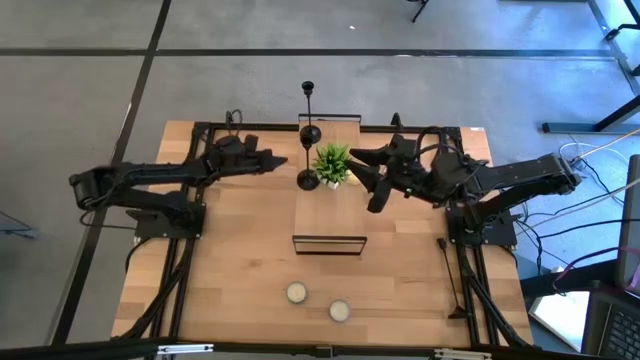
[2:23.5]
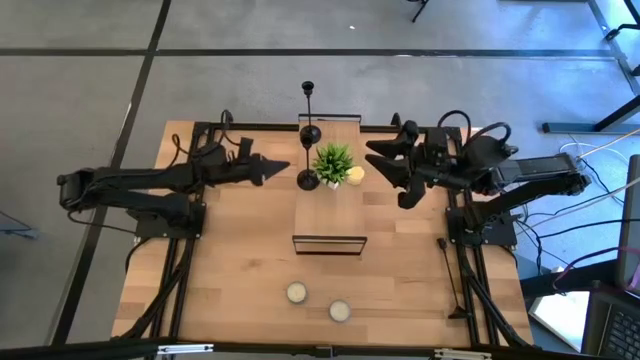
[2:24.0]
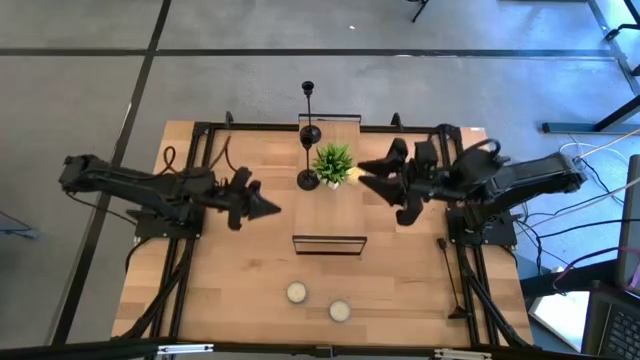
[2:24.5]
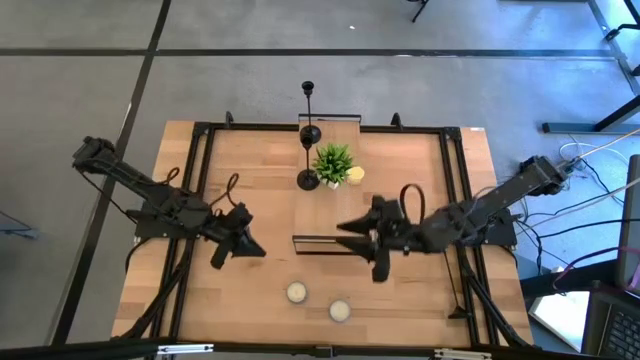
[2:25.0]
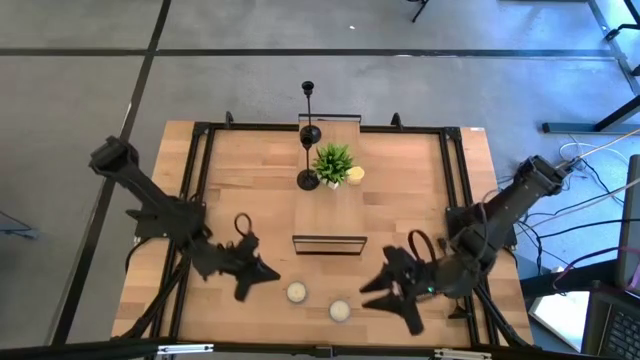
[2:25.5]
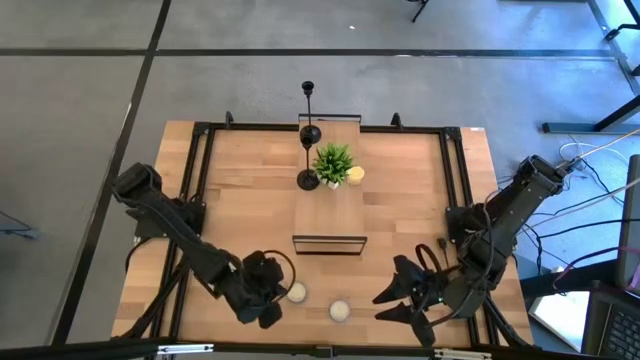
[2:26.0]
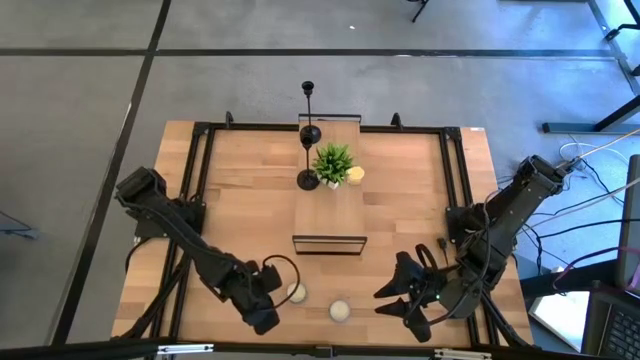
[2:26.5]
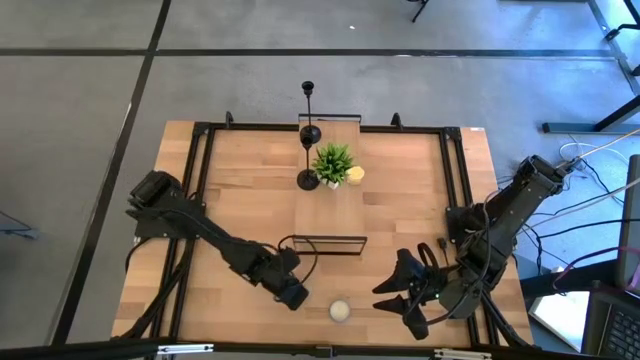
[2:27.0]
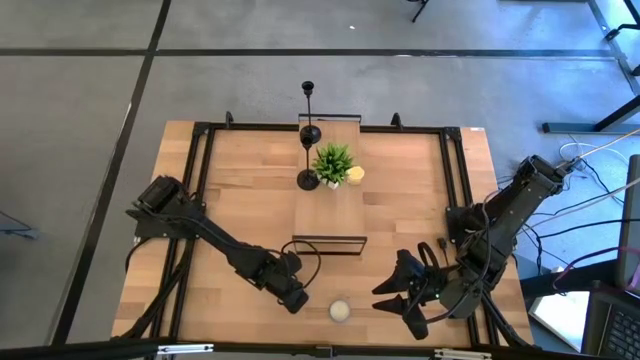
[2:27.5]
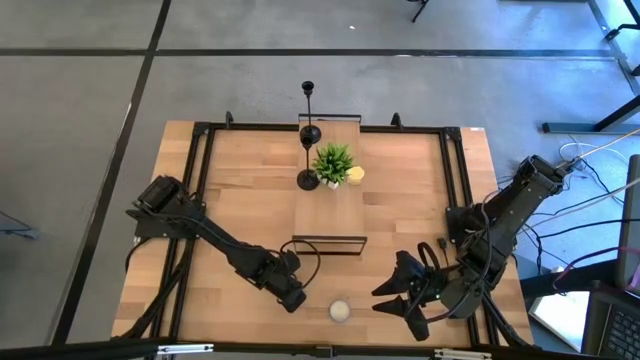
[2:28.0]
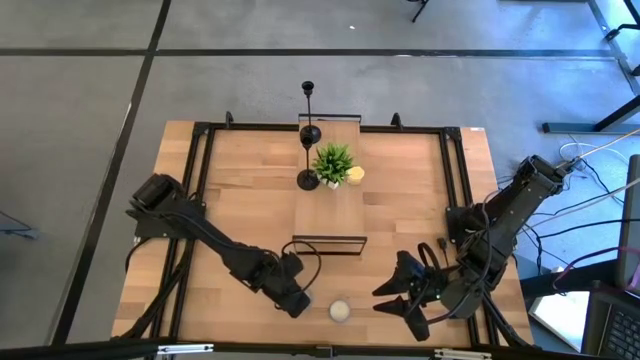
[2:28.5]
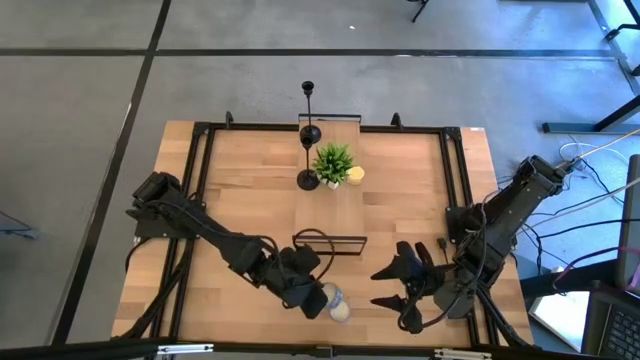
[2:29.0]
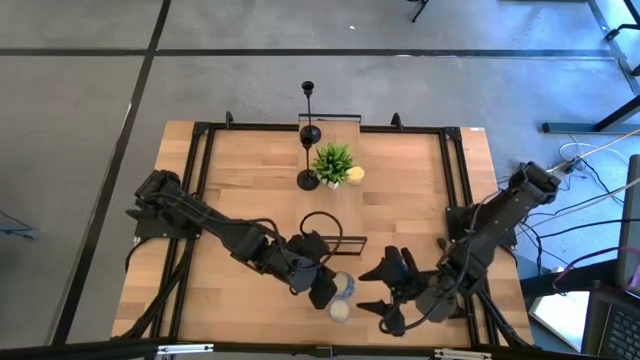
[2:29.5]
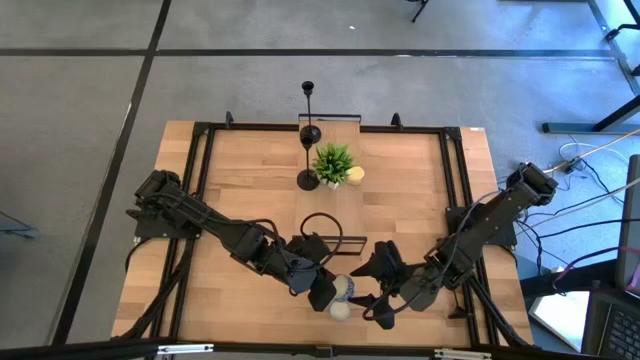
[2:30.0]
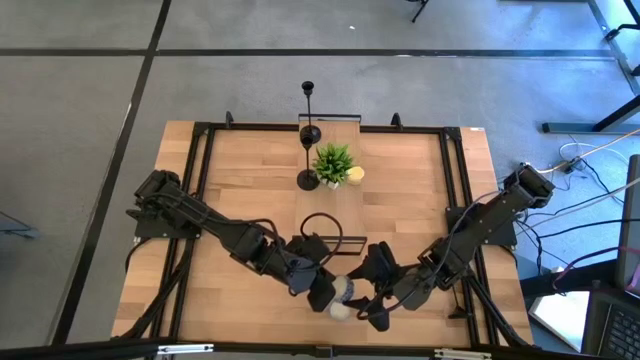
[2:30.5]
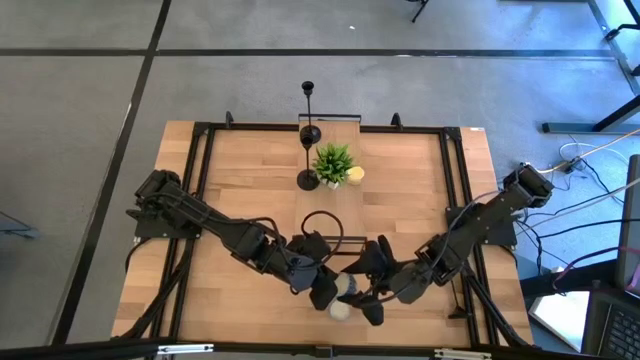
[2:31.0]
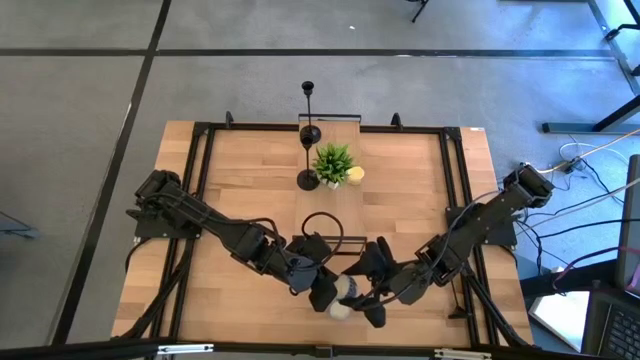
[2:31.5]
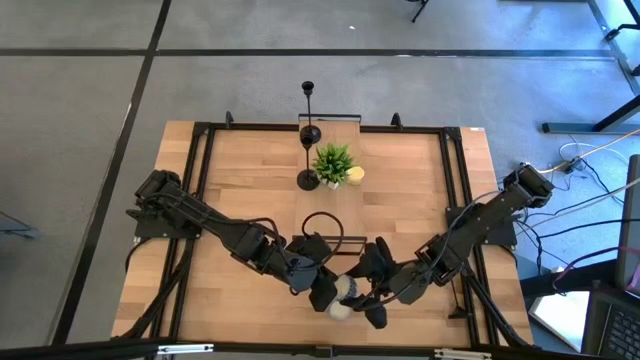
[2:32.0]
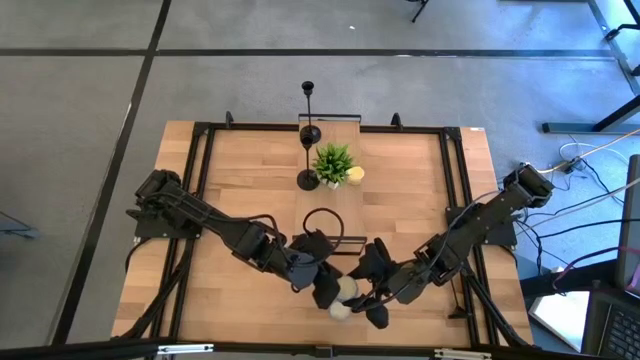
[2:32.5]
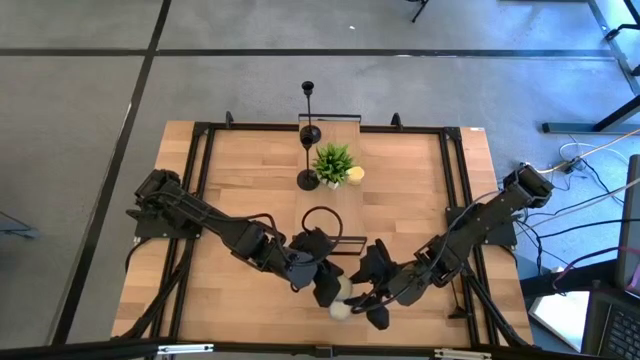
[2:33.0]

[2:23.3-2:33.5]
Task: Pick & Place candle stick holders
Put the left blue scented candle on the shelf

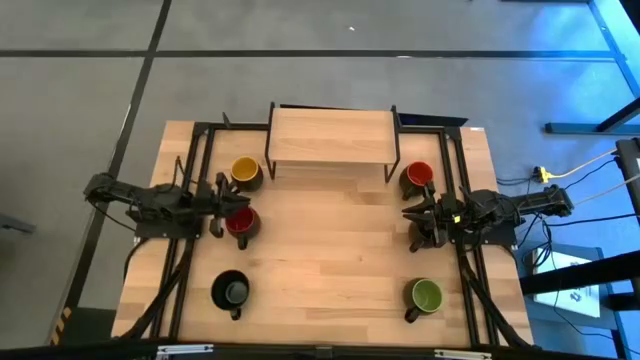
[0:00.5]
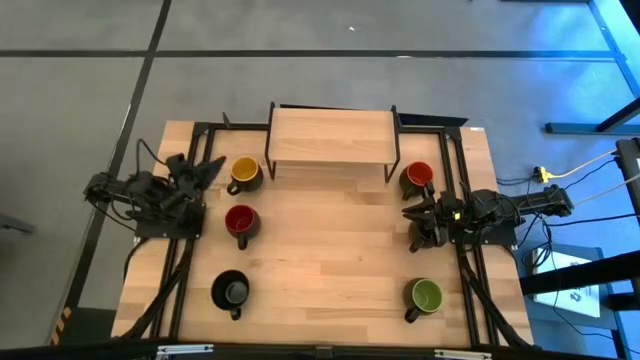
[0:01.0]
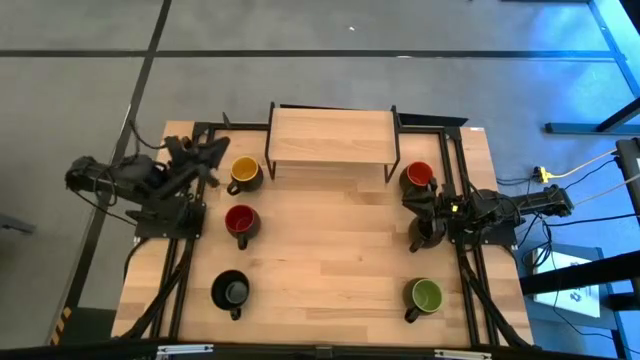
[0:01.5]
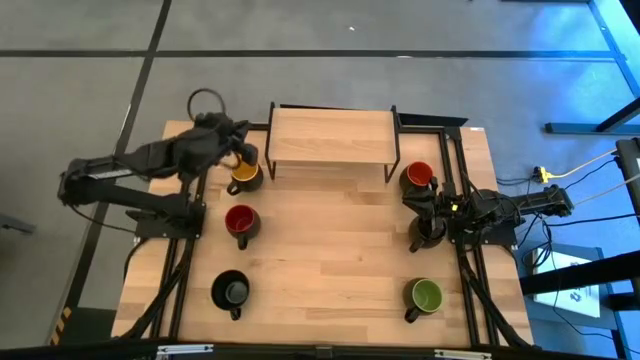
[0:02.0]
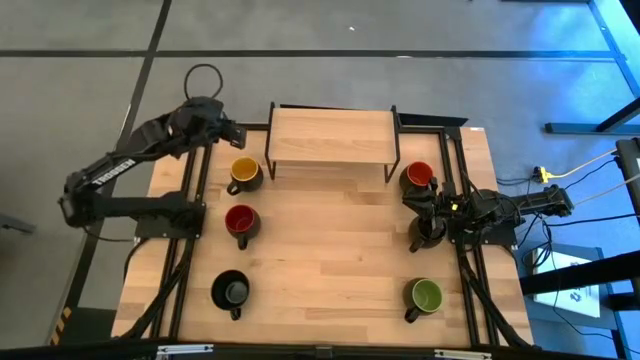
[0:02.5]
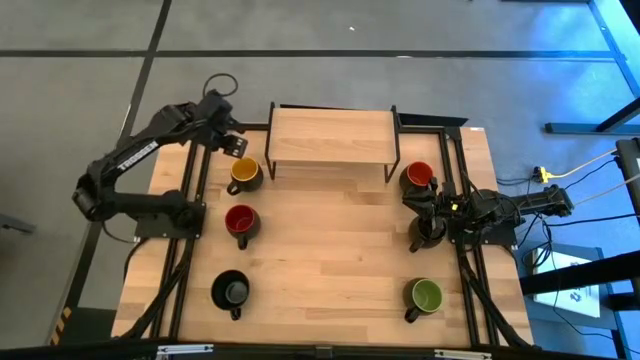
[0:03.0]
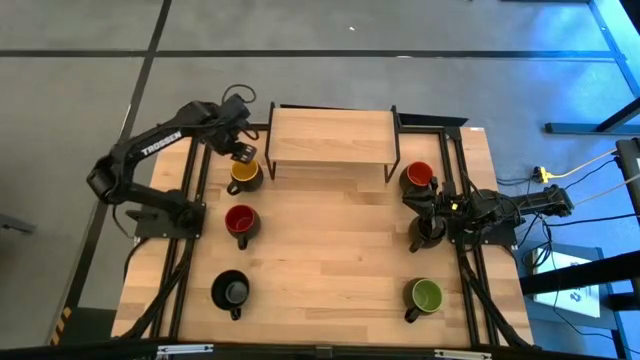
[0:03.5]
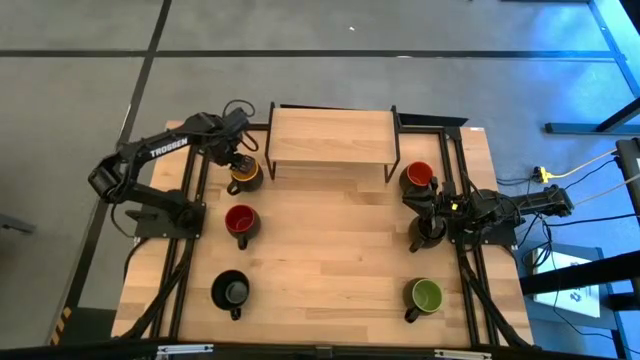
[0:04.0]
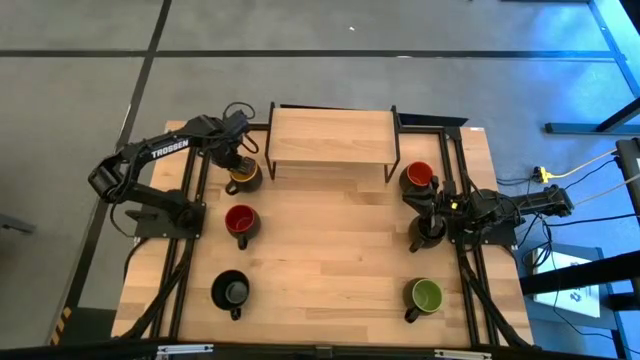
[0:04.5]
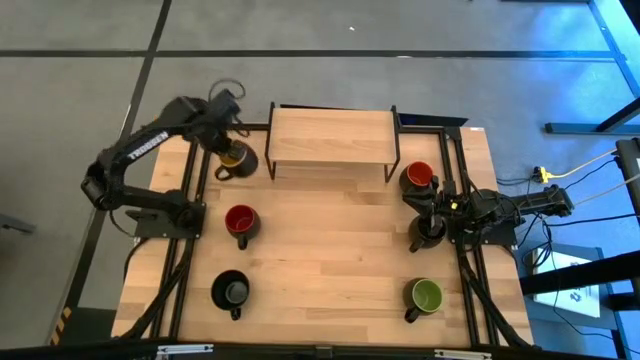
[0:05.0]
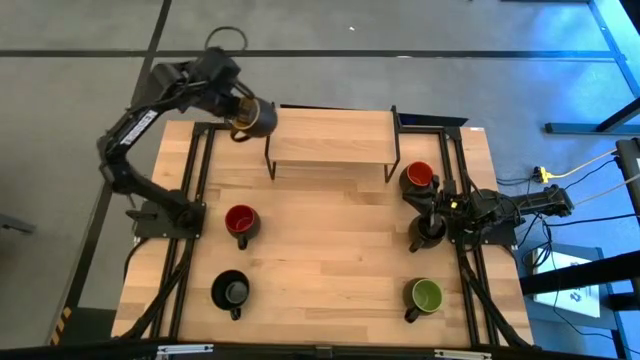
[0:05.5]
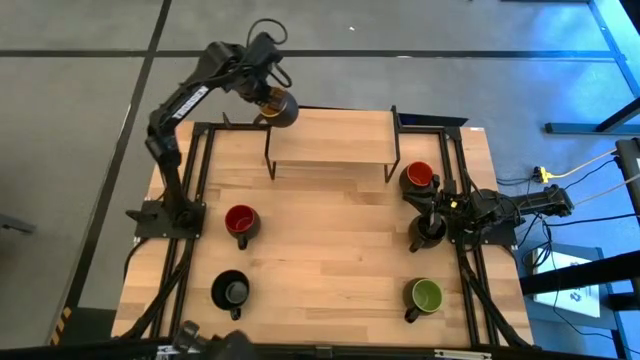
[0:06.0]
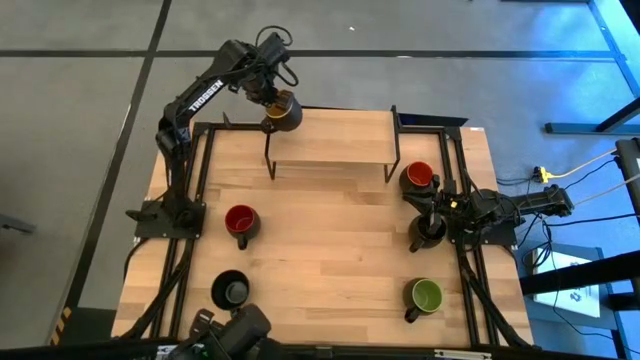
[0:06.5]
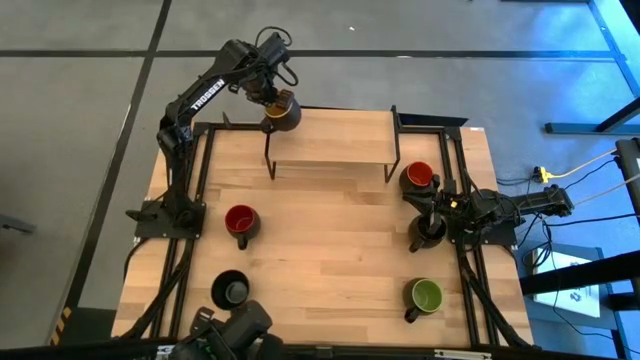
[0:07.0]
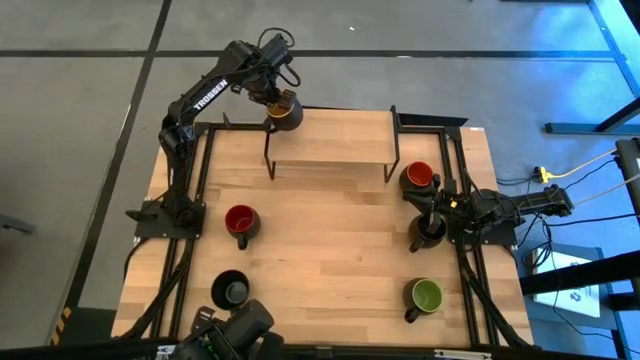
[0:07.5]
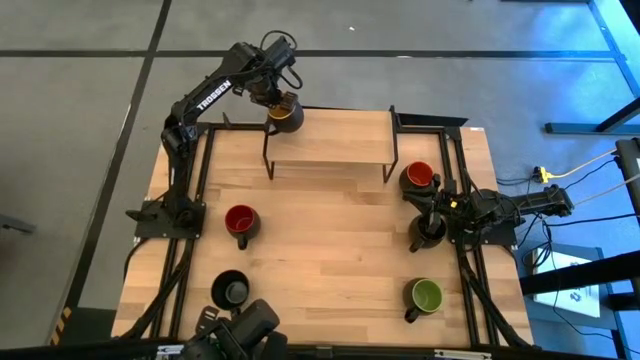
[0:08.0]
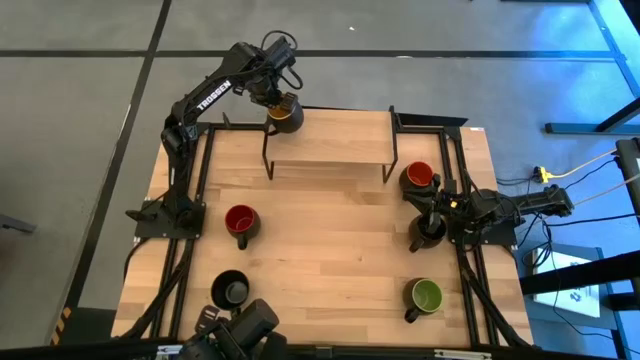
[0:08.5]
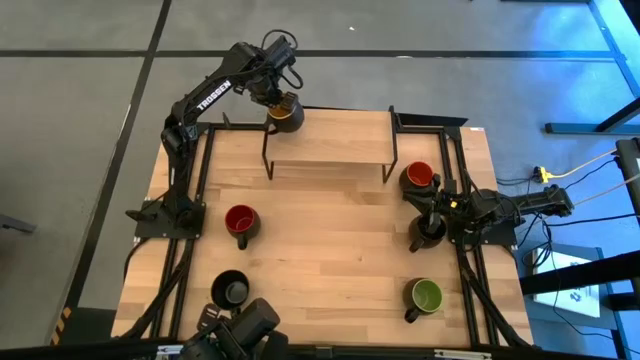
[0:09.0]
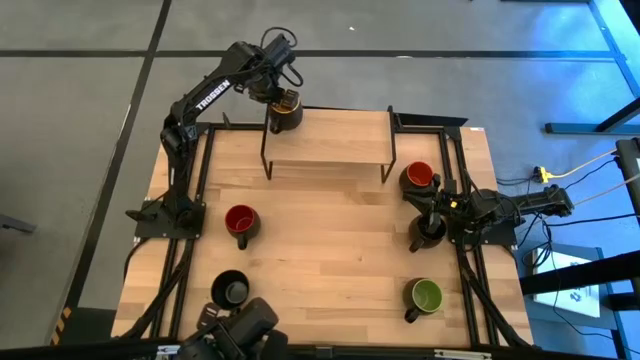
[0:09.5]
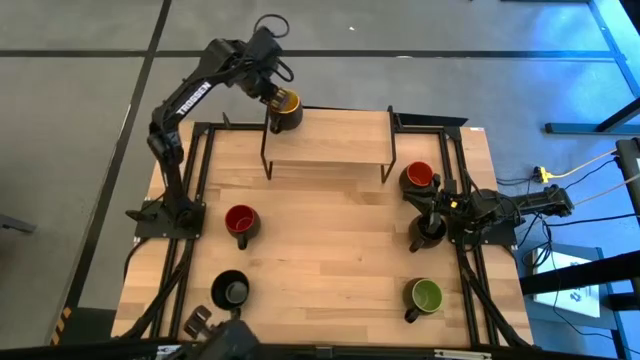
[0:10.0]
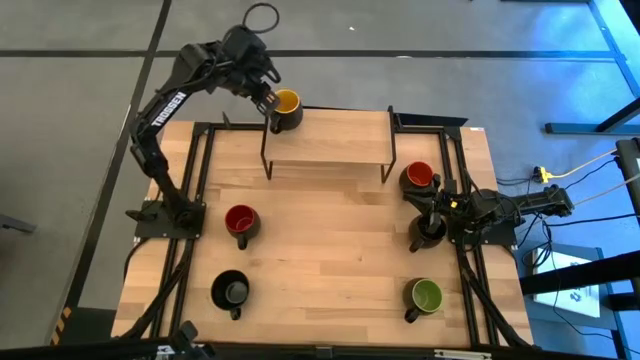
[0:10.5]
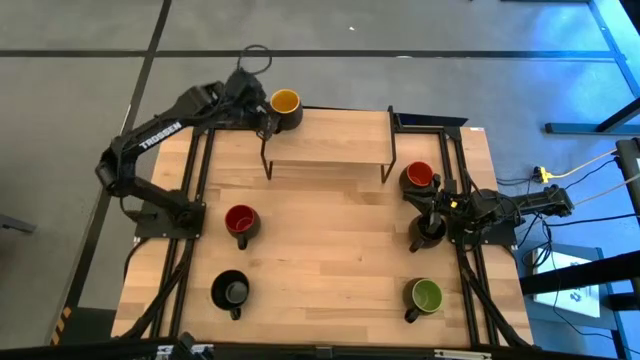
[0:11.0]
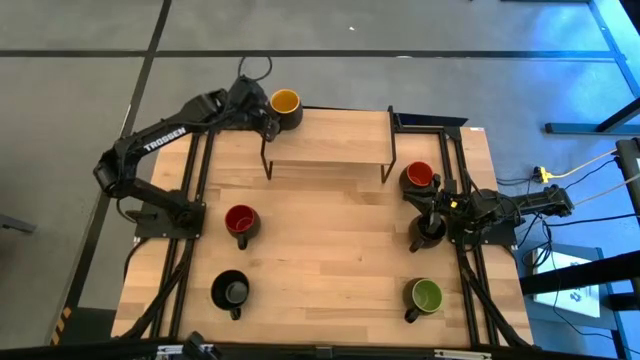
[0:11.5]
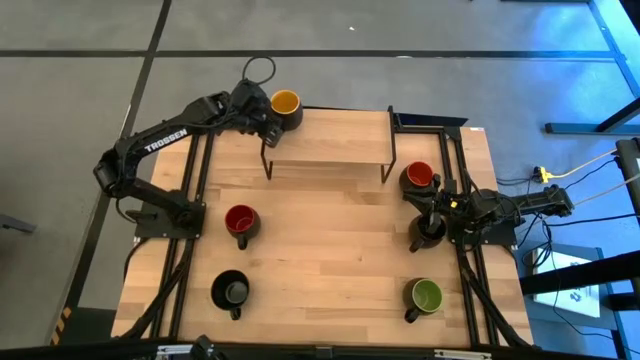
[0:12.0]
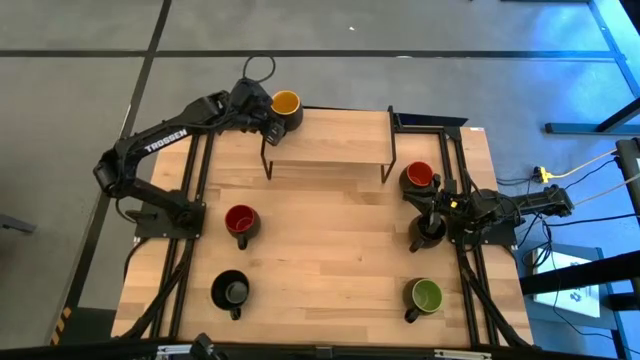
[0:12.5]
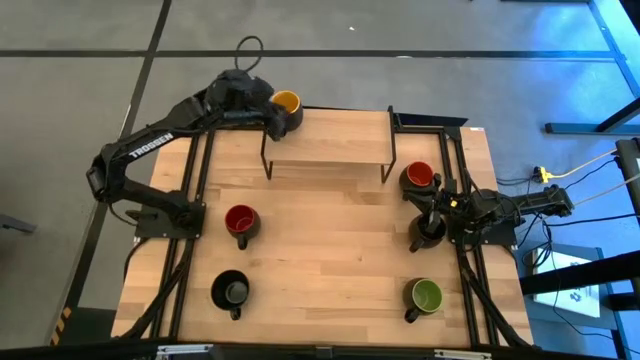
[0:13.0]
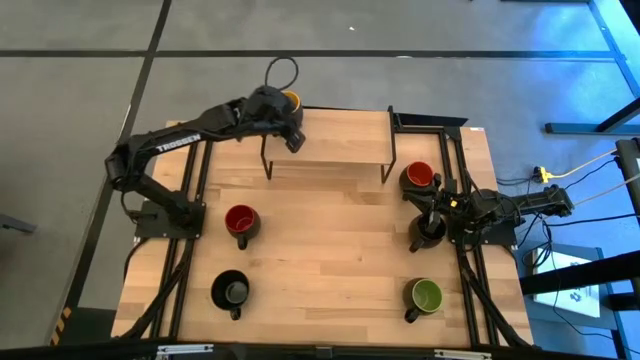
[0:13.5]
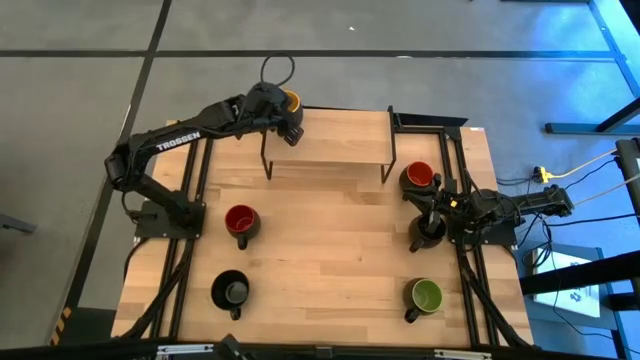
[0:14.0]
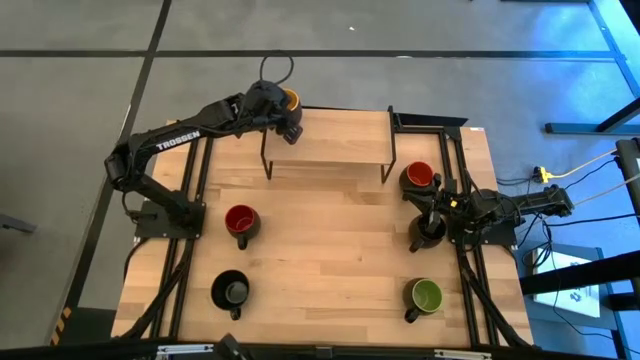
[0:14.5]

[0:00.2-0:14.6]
Task: Place coffee mugs
Put the yellow mug on the shelf
